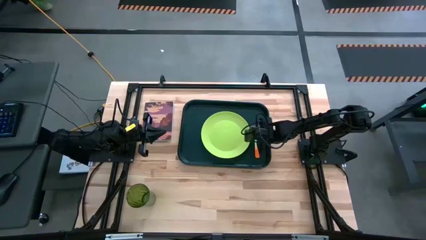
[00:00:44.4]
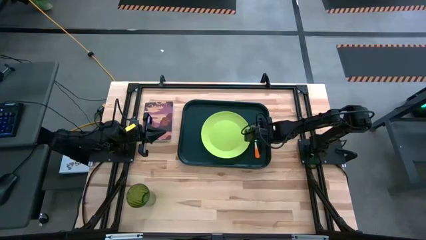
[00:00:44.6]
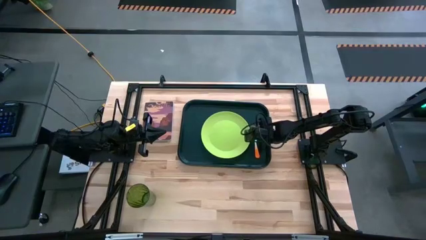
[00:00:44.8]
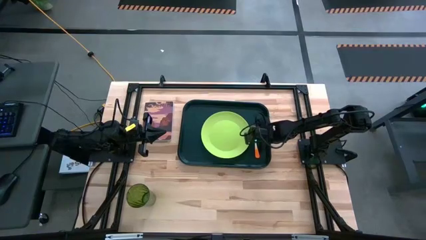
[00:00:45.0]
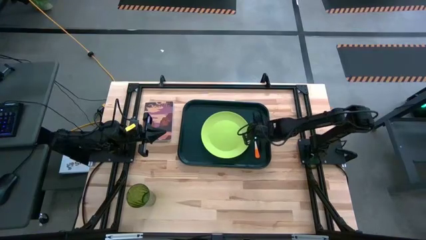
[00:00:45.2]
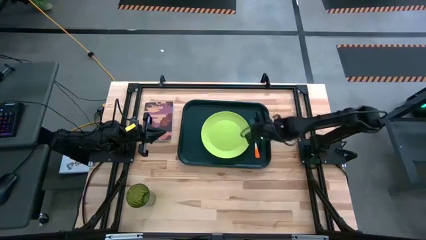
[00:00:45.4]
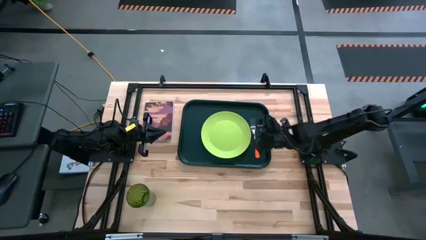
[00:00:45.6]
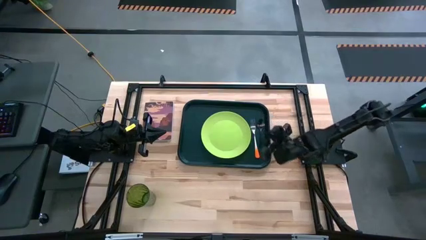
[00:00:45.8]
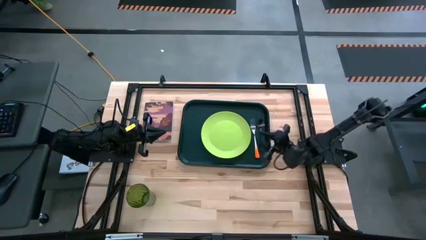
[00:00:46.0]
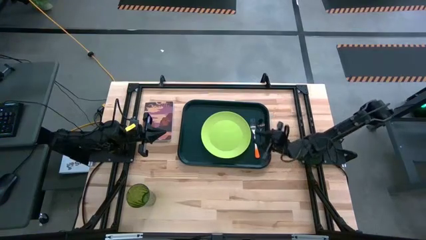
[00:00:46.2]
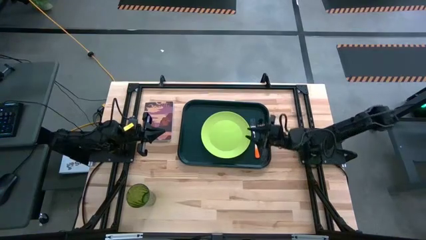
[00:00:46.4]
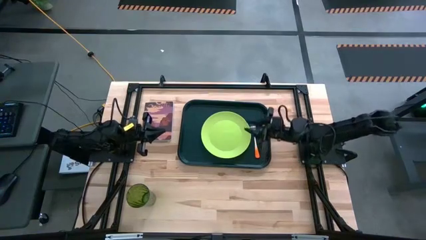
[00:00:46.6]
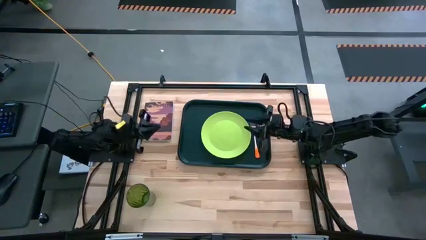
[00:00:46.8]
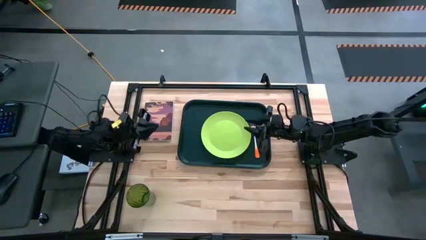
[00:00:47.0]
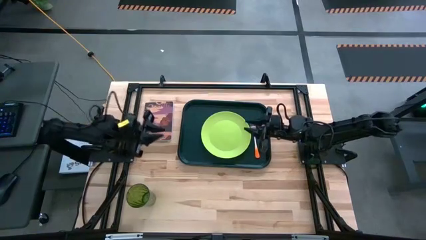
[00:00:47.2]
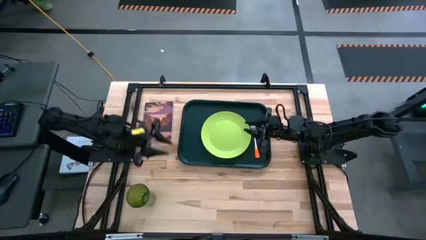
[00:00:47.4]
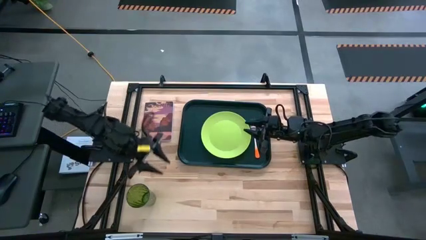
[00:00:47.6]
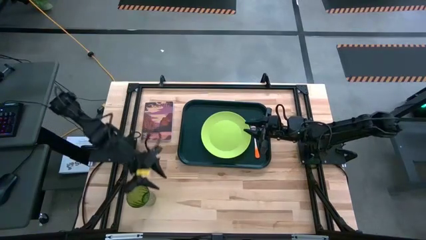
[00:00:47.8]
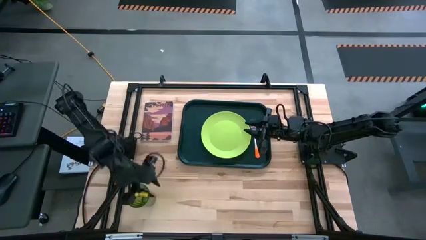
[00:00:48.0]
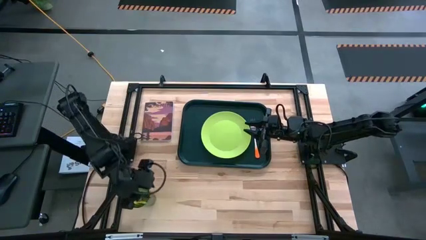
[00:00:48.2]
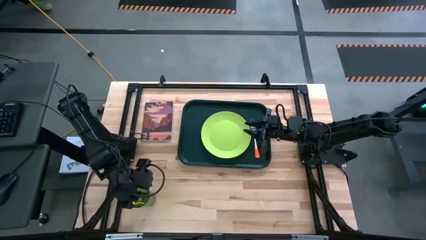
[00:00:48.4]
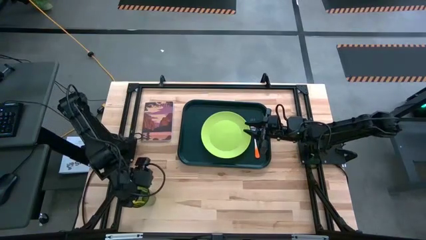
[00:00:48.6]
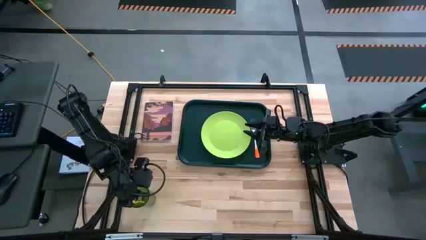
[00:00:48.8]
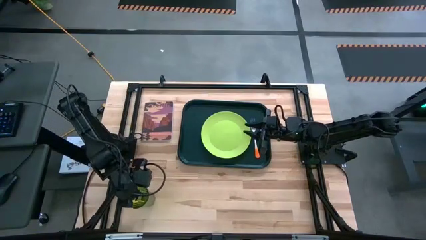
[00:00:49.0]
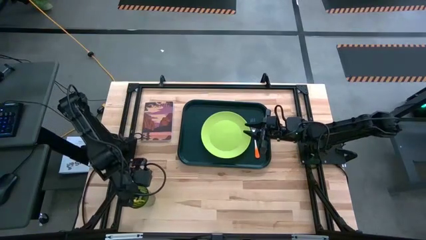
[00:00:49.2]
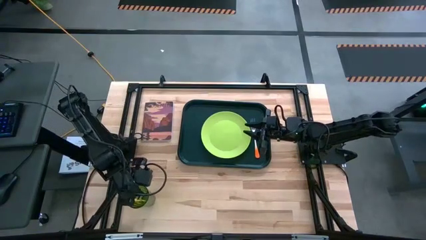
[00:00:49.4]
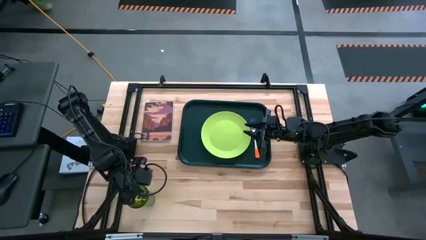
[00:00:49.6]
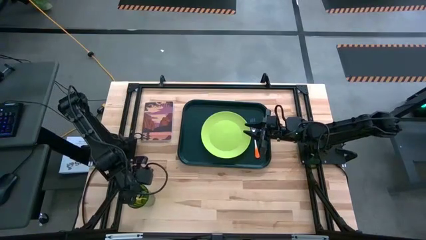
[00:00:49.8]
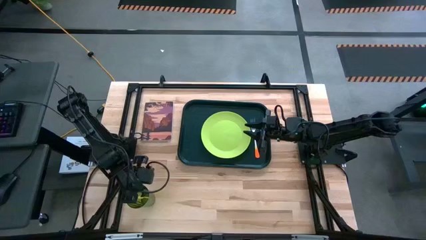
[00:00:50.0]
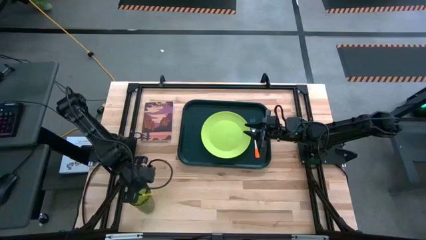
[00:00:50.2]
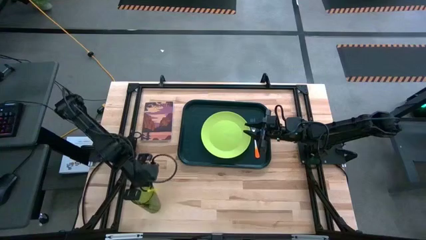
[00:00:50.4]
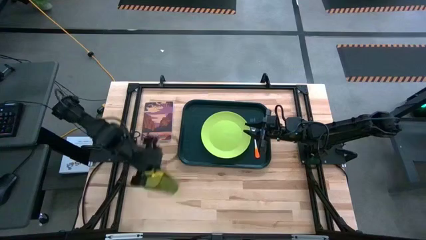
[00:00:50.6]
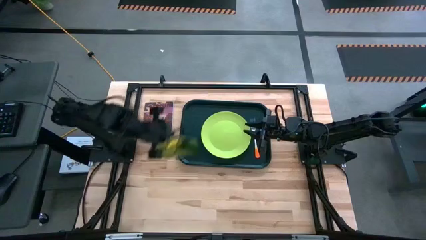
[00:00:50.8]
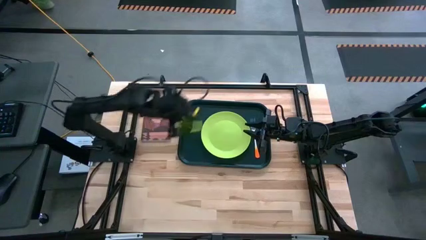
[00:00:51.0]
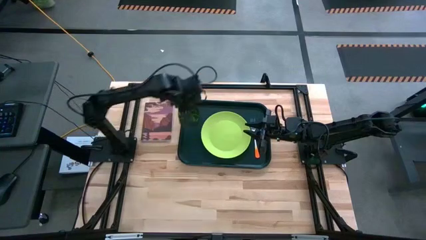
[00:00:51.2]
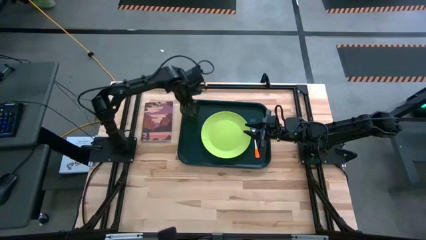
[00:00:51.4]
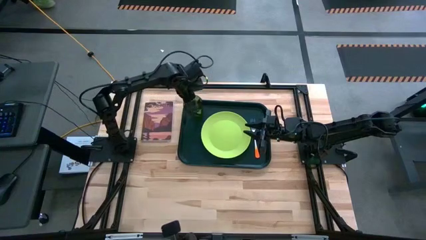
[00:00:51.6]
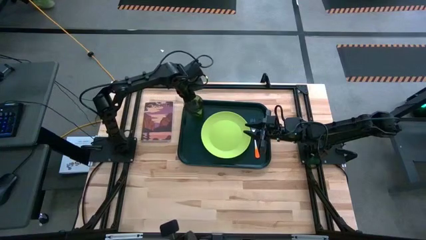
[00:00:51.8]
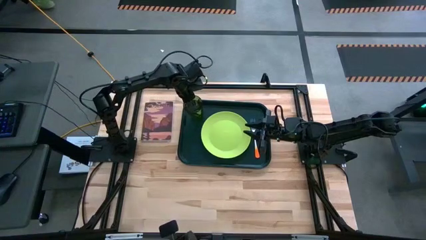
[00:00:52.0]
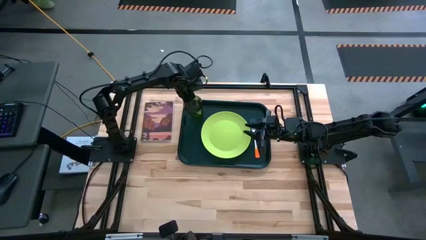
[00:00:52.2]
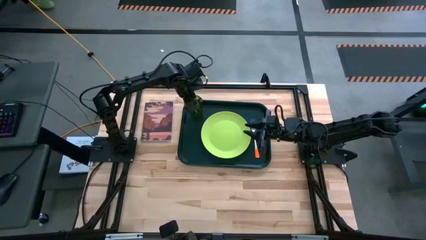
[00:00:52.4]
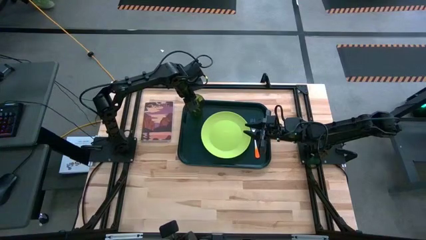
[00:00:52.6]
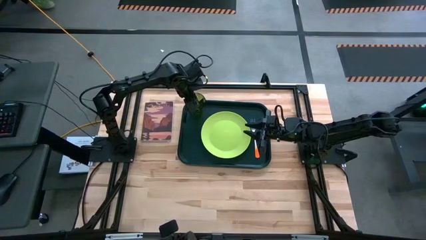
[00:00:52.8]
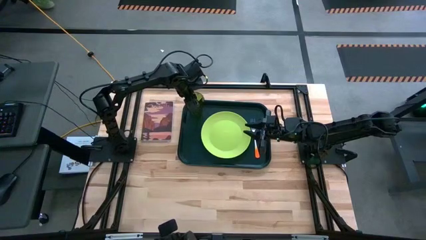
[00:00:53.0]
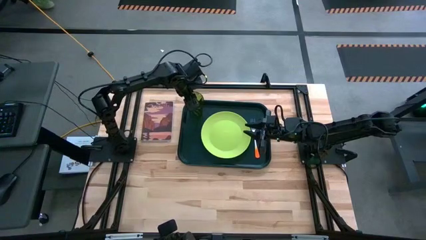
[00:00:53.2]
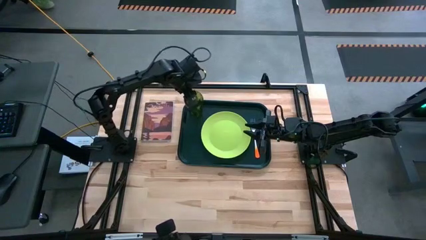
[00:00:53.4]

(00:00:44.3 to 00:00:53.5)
Task: Pick and place plate/cup/fork/spoon on tray
Put the green cup on the black serving tray to the top left of the green plate

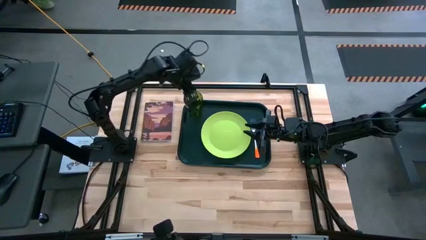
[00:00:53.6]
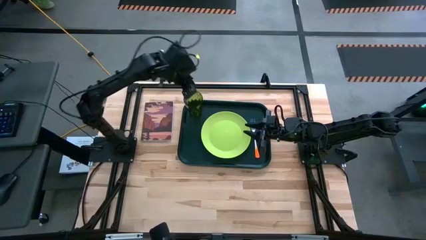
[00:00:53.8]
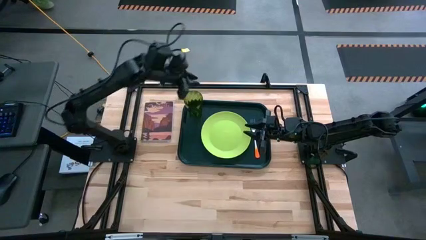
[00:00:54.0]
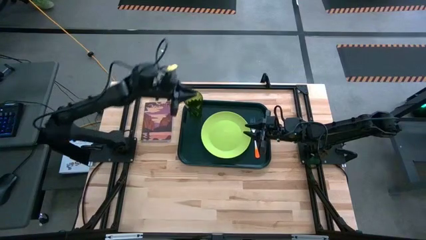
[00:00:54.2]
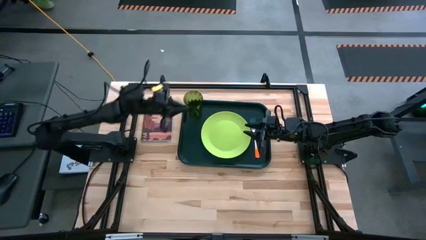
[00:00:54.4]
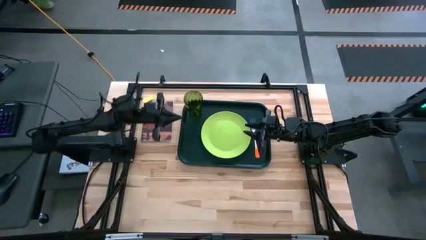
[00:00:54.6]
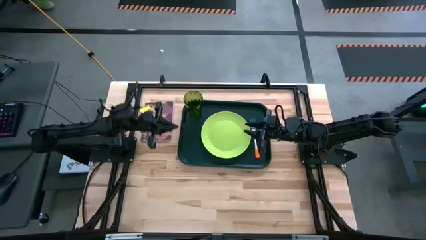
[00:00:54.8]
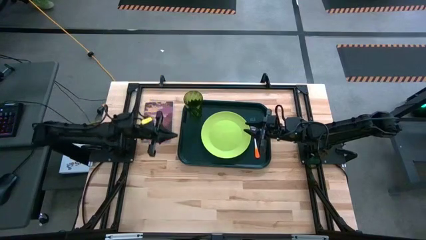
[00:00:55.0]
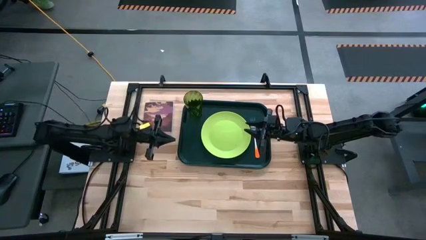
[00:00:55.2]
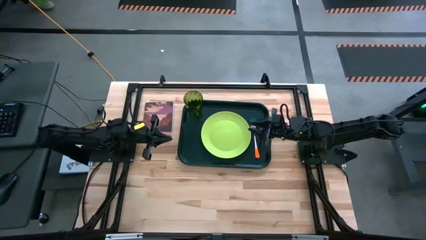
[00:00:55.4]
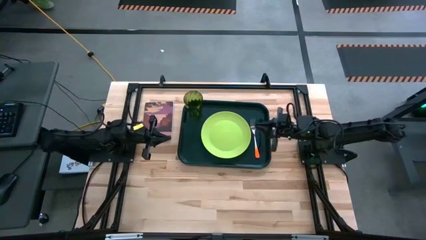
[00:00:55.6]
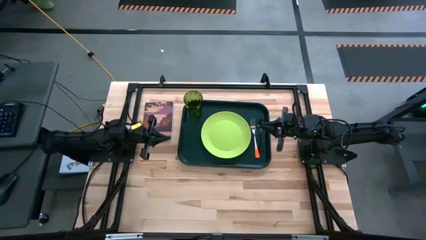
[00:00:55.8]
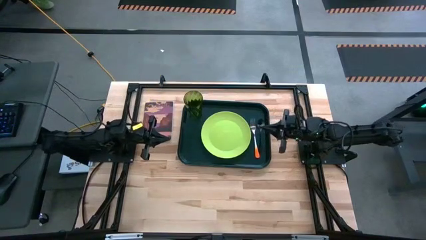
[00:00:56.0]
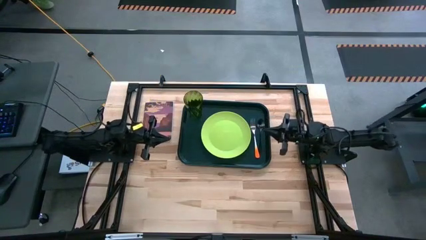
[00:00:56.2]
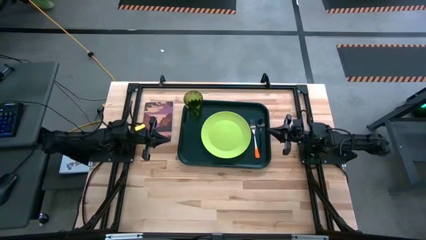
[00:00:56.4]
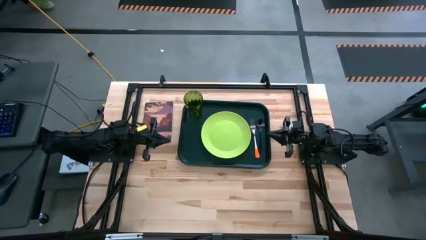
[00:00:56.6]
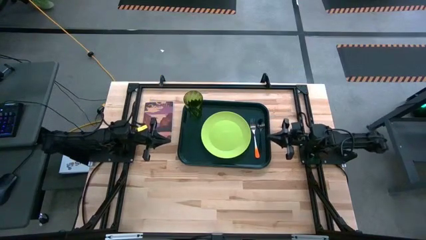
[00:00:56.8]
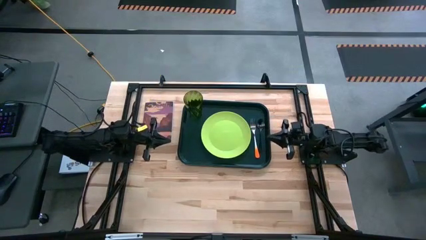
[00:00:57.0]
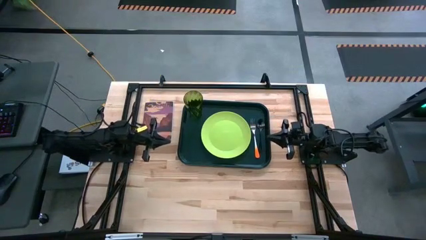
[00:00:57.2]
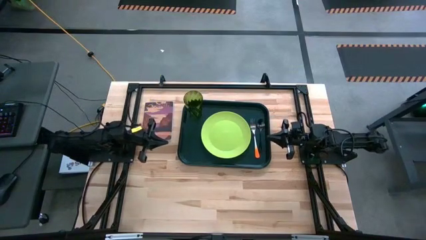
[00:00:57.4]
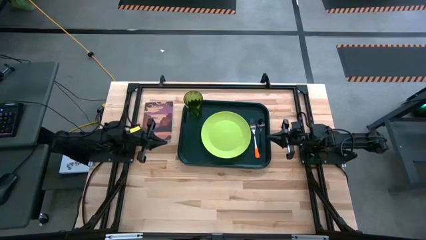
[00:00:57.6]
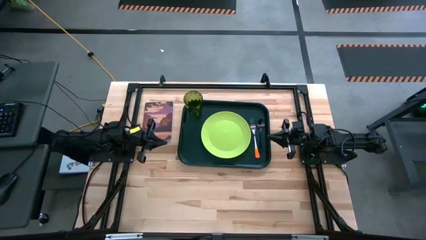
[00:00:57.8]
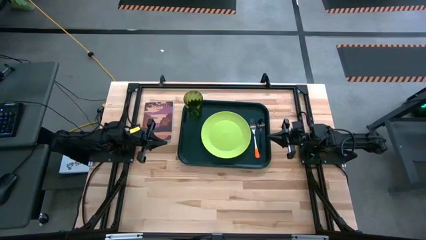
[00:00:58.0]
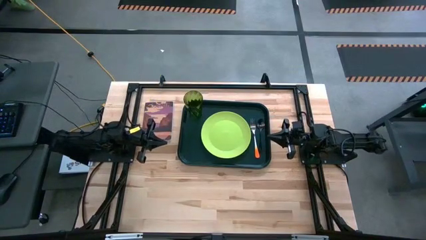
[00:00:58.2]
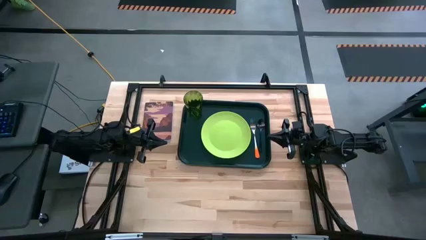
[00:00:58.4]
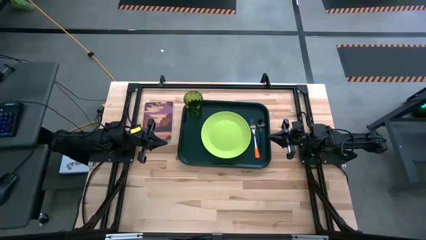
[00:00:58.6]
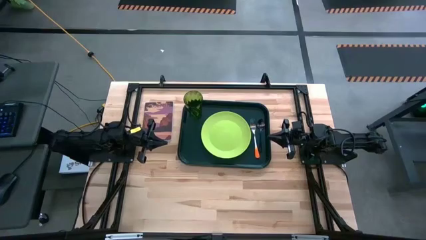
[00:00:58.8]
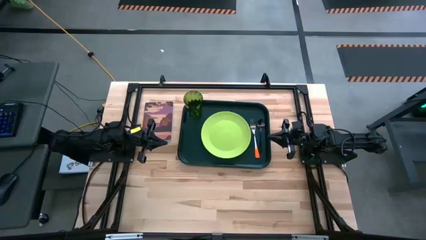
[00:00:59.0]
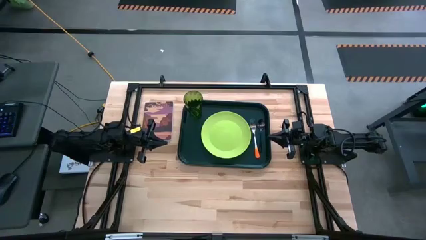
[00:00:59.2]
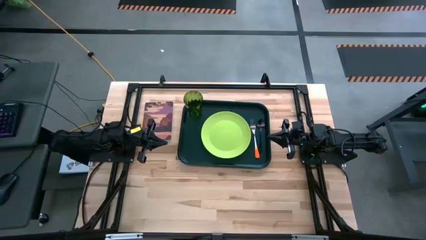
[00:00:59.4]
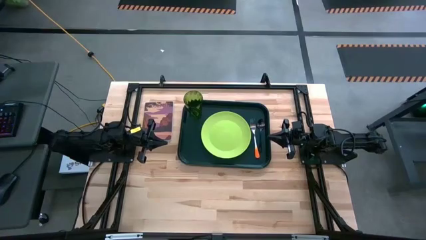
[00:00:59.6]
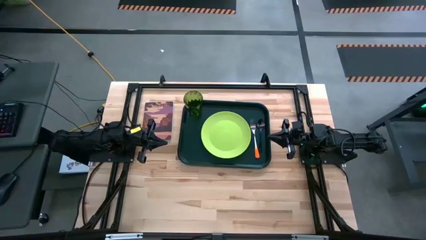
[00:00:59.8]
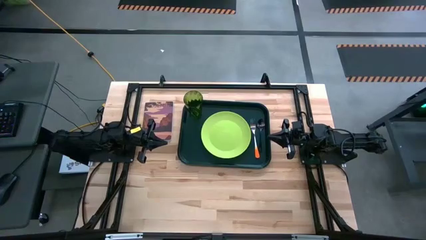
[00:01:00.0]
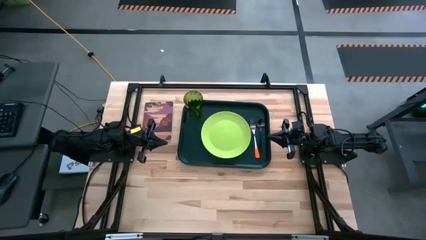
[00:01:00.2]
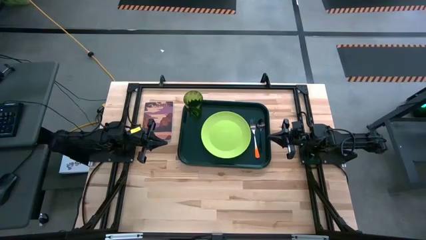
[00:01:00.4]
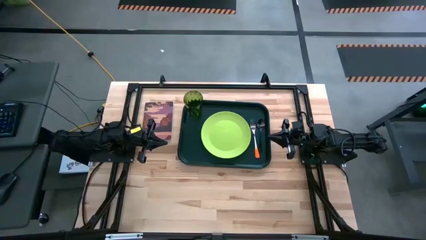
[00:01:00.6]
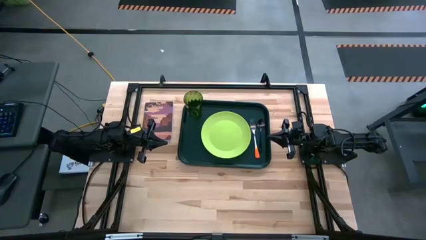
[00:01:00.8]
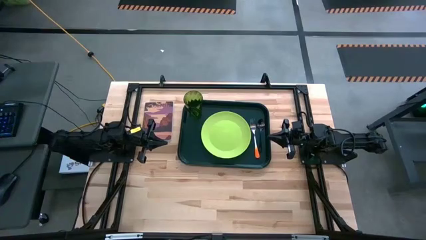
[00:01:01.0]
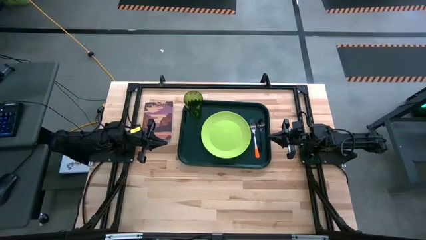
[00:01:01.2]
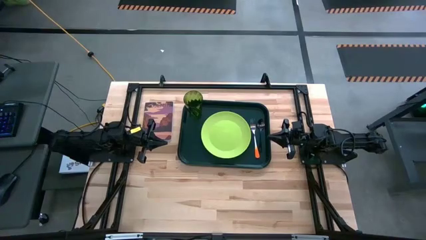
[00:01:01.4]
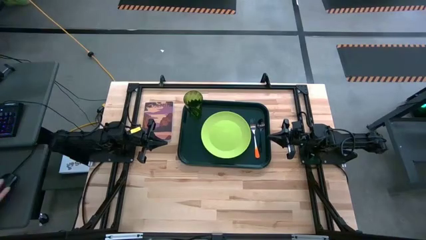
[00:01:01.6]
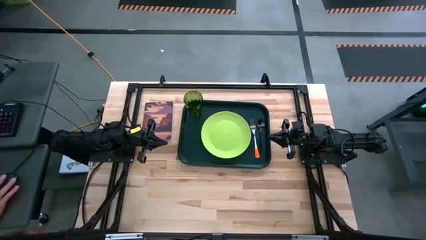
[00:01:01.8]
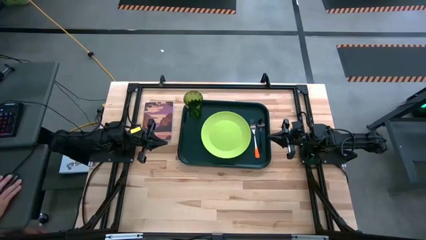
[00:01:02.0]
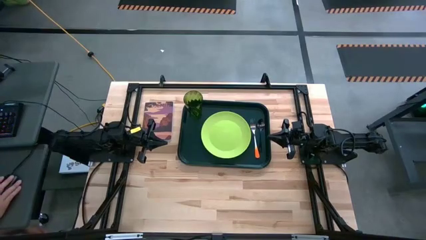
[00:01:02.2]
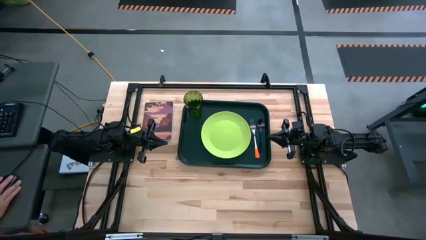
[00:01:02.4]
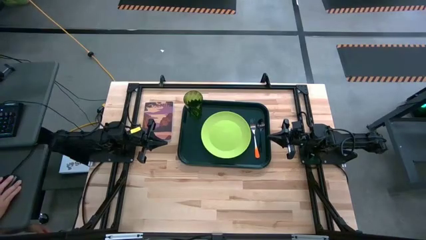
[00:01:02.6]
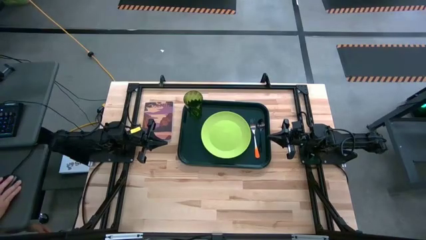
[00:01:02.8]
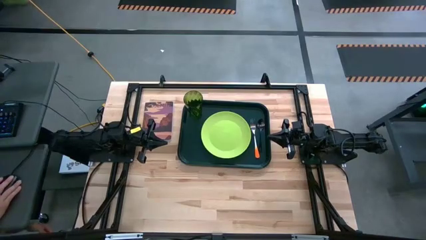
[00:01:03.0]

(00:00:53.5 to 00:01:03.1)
Return to Home Position
